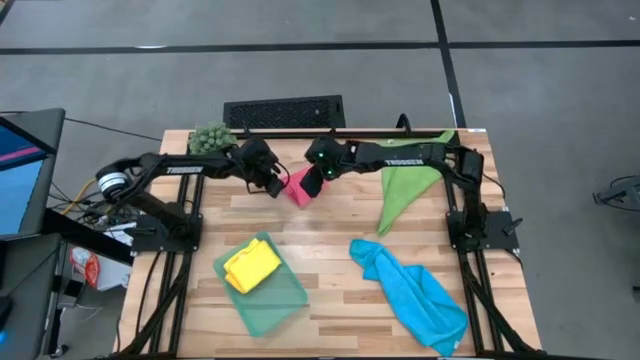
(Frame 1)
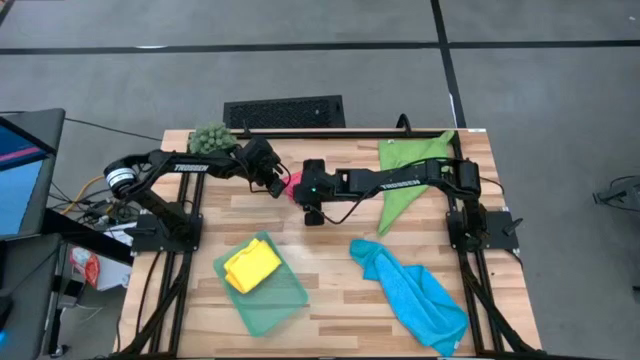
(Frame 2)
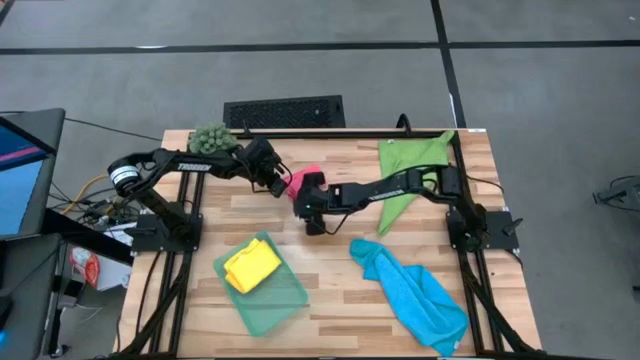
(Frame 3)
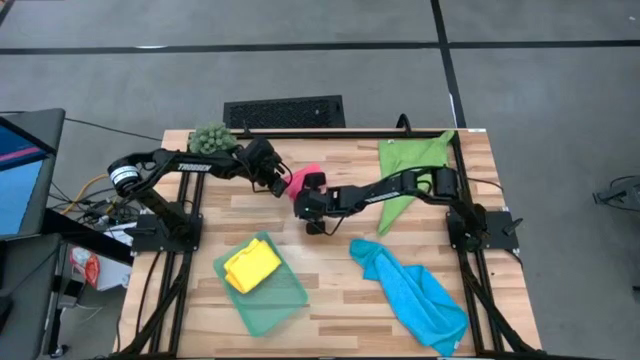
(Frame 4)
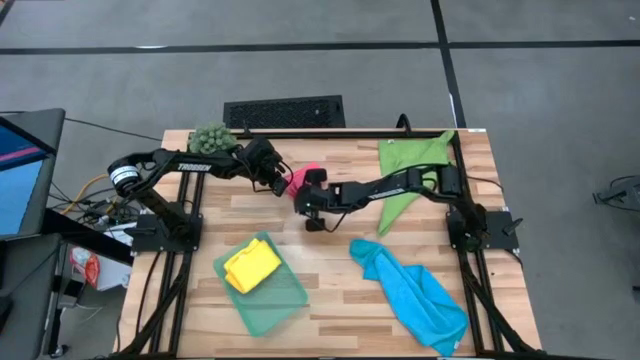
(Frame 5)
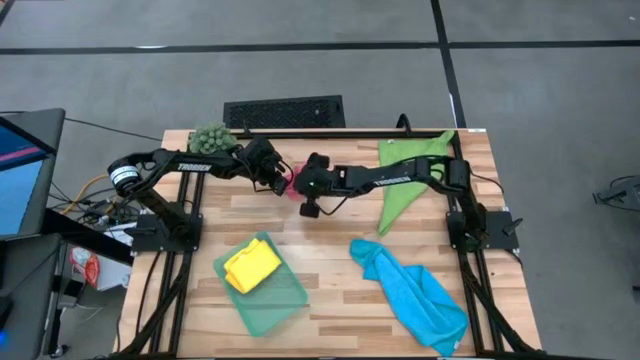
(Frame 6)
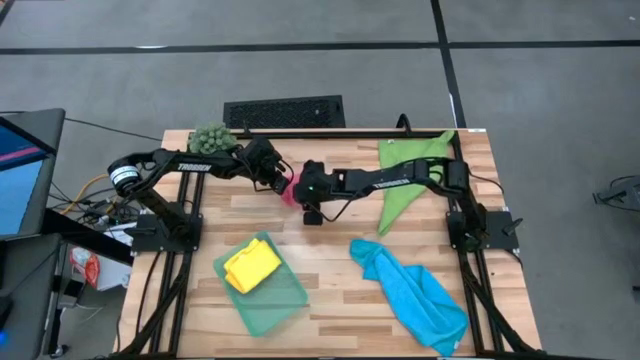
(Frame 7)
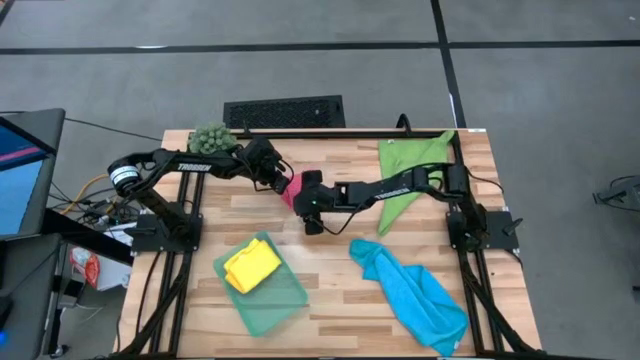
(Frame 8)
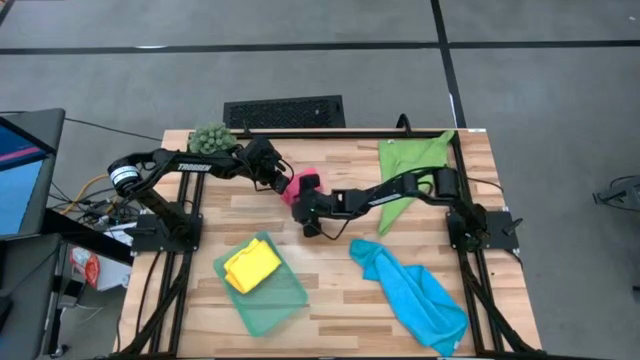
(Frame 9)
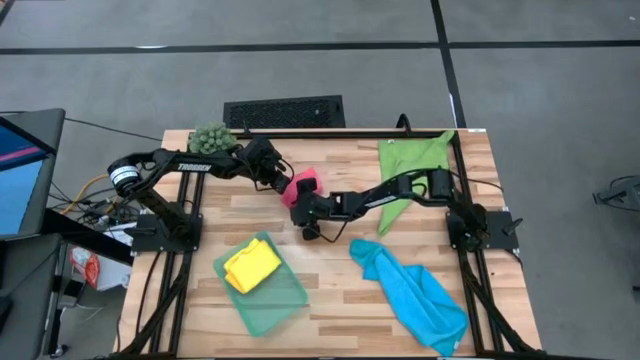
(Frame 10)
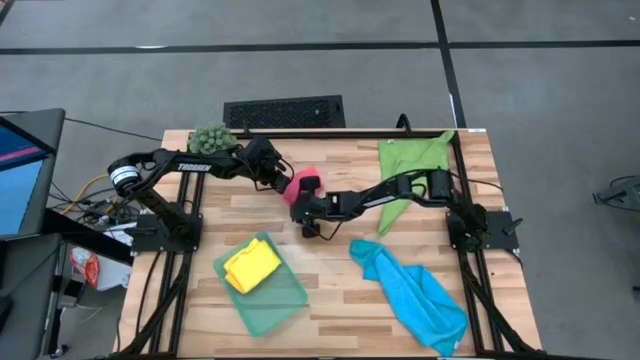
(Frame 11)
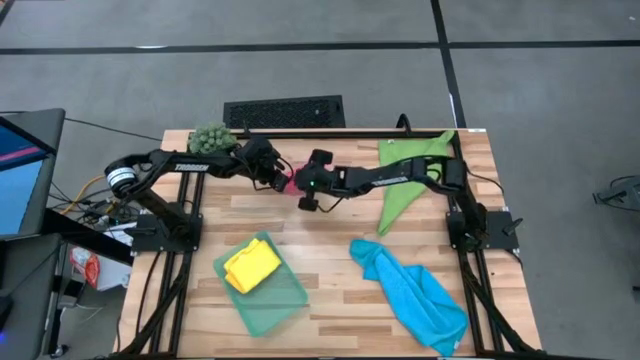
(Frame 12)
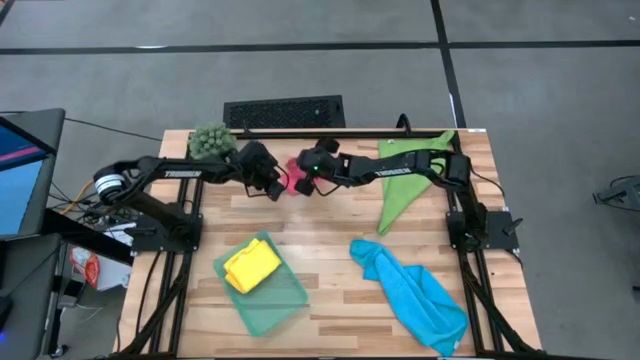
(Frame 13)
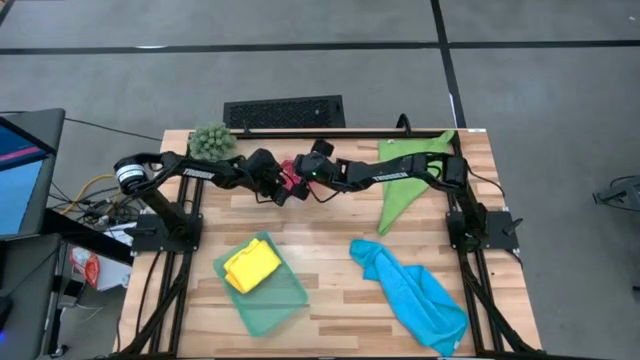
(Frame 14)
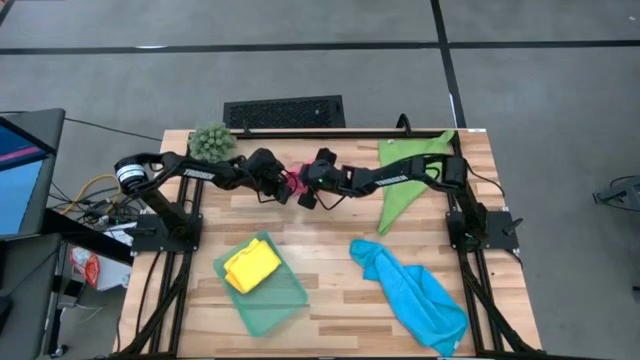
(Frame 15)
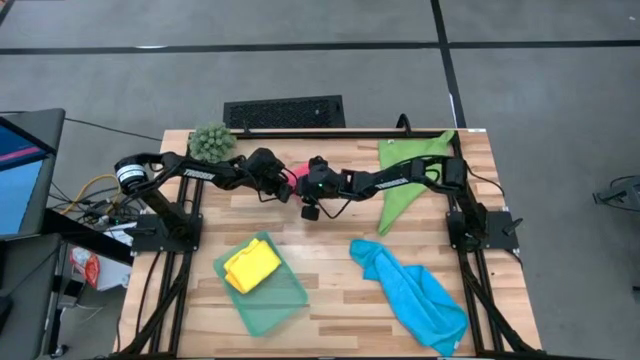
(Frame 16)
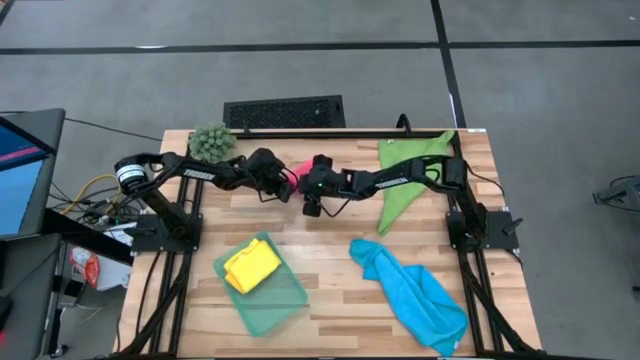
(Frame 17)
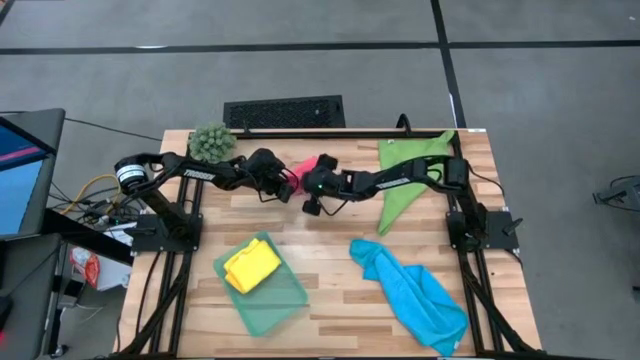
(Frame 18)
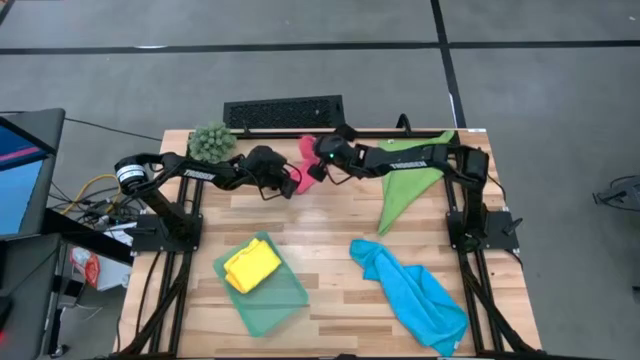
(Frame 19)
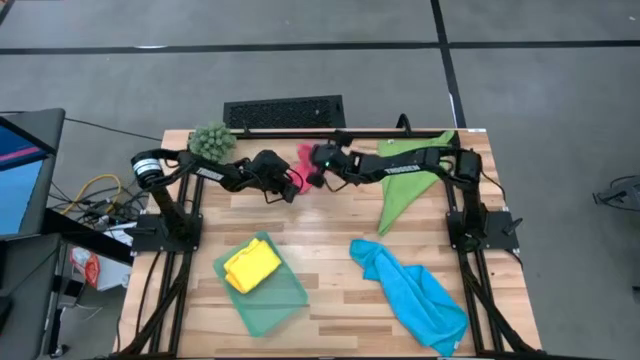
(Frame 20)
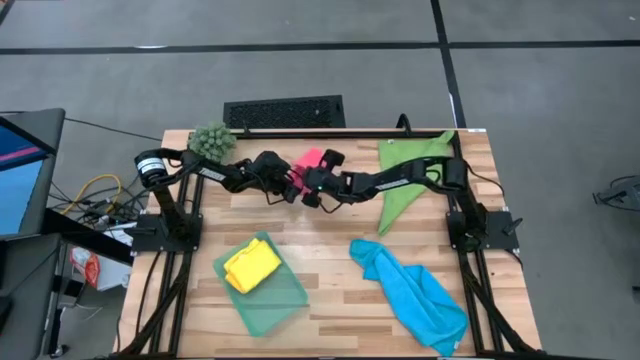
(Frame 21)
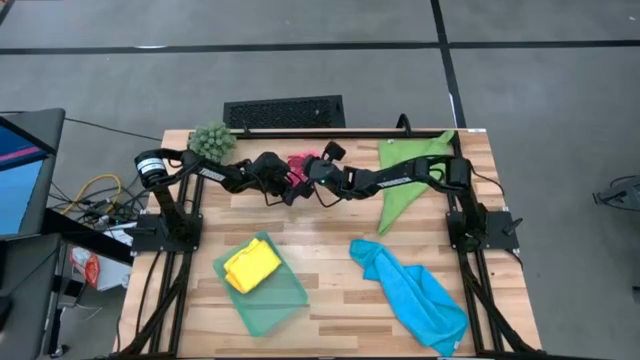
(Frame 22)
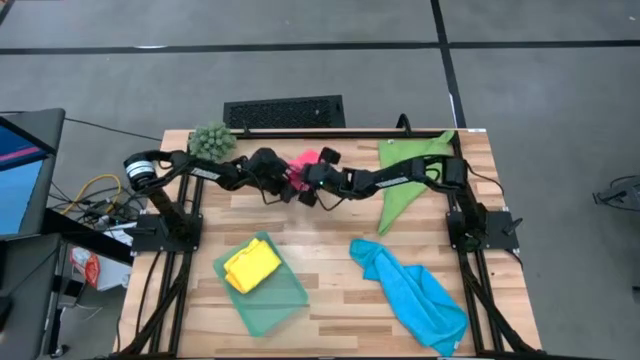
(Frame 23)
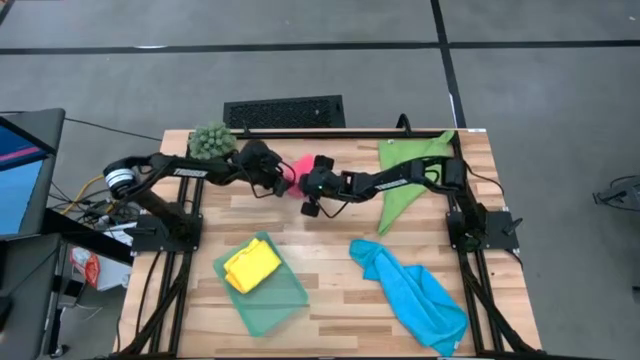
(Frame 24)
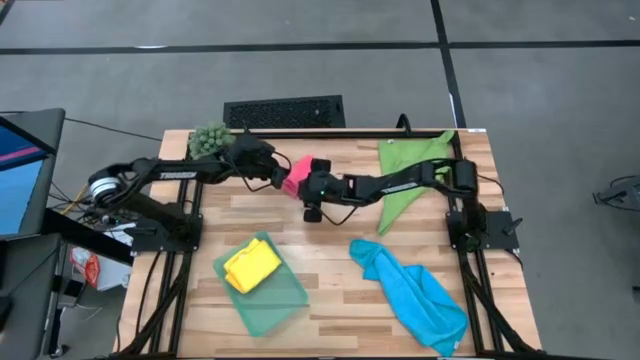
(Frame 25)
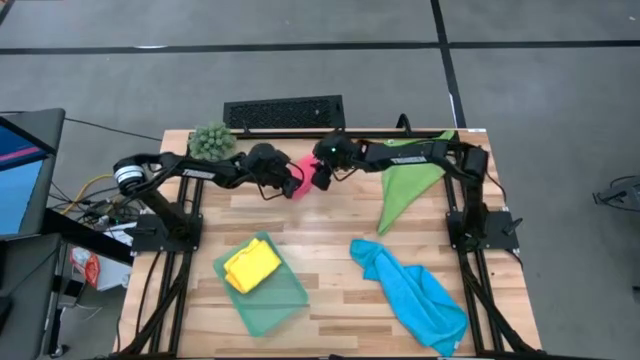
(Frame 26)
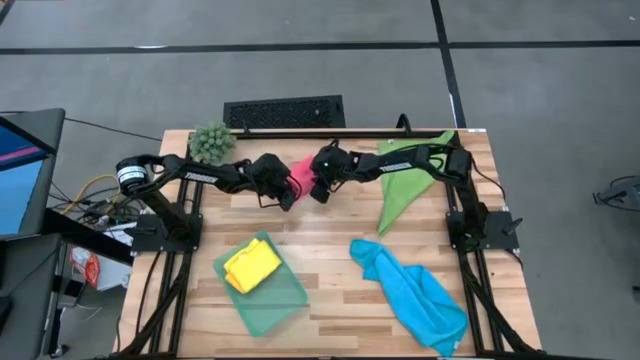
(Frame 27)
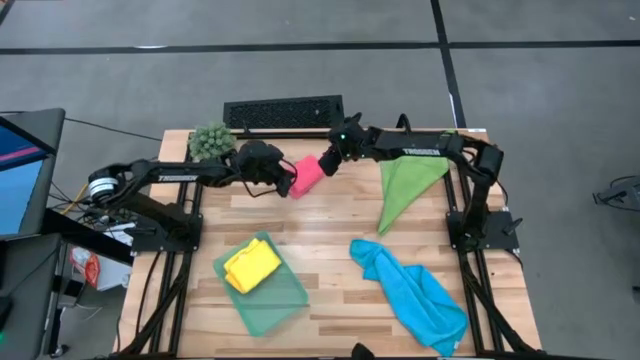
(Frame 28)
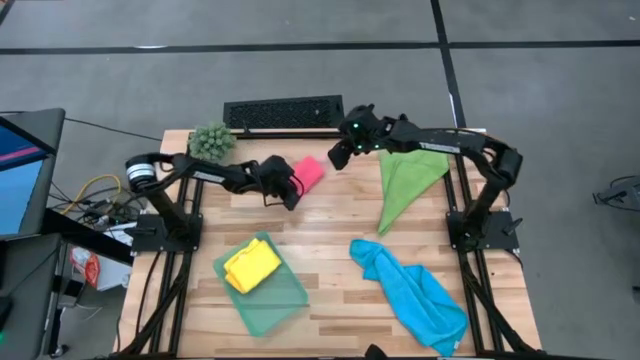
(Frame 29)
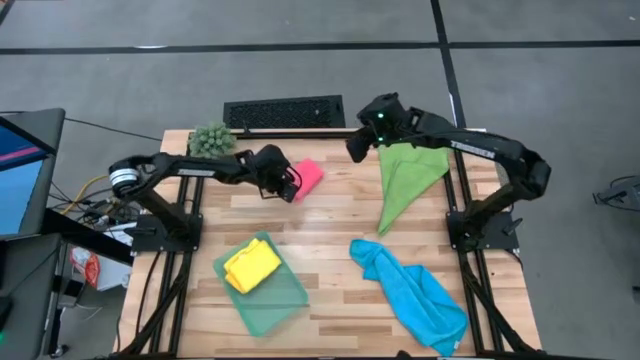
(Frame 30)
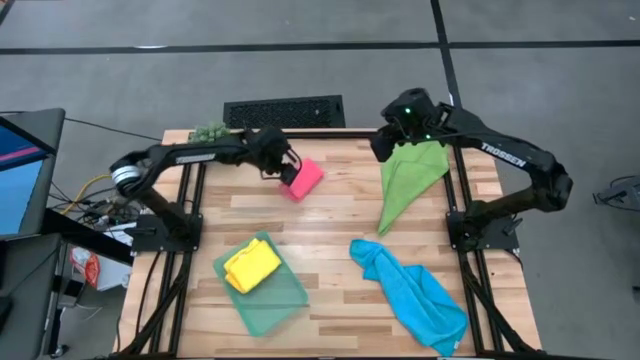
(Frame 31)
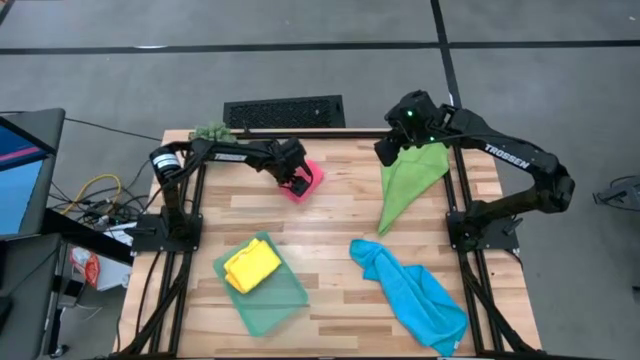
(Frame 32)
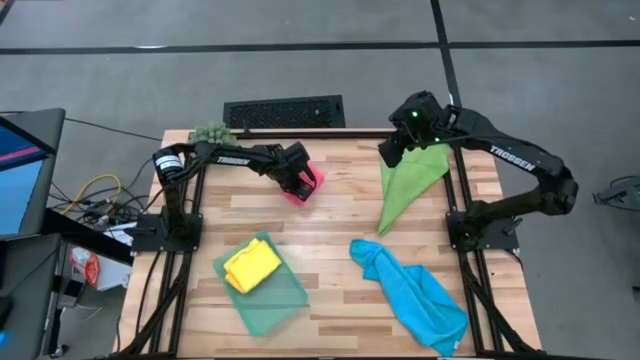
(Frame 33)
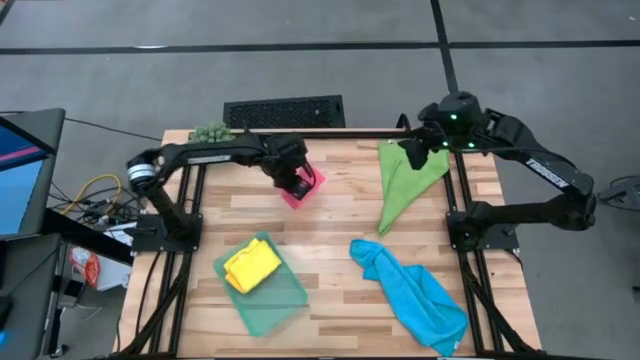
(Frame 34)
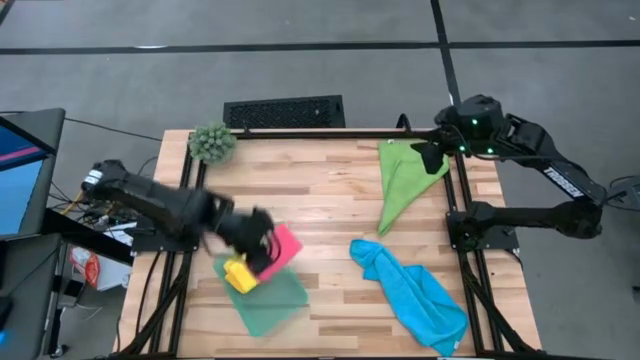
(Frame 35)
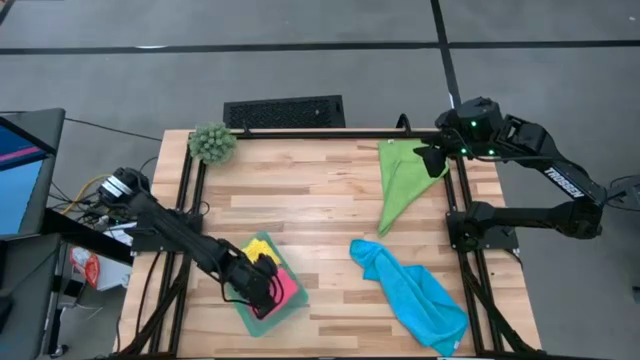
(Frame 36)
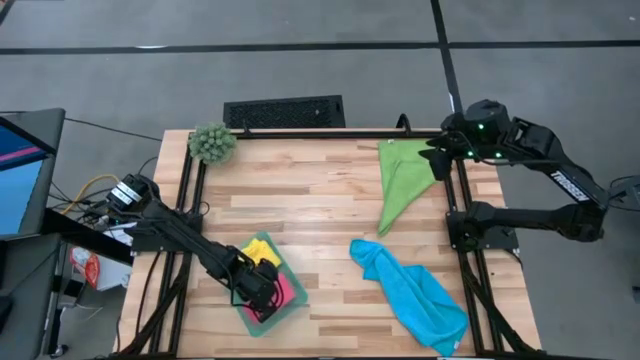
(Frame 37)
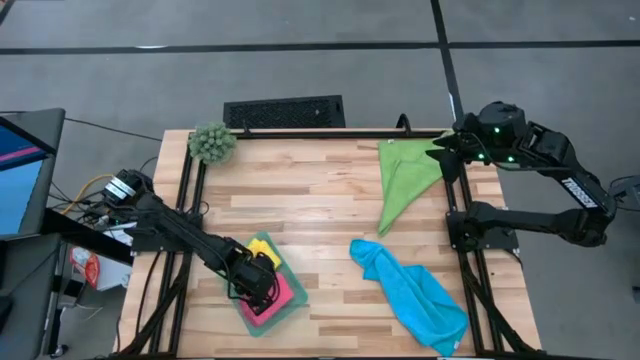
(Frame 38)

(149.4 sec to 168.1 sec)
Task: Fold microfiber towels
Put the folded pink towel in the green bin
